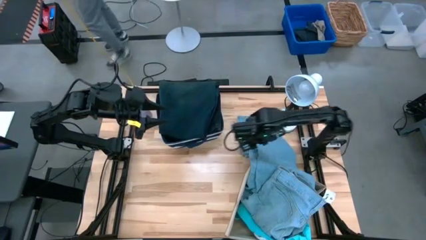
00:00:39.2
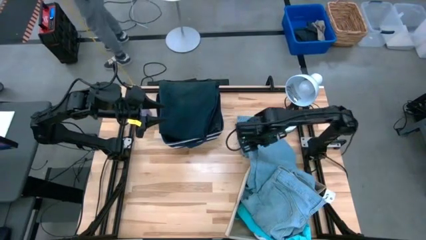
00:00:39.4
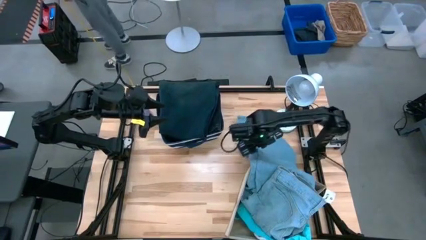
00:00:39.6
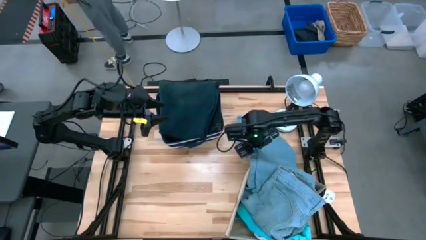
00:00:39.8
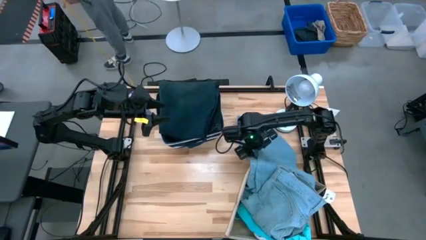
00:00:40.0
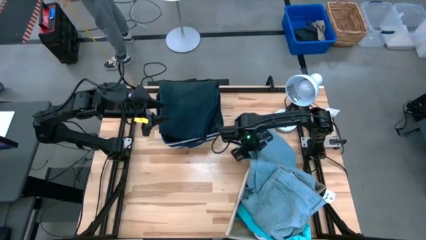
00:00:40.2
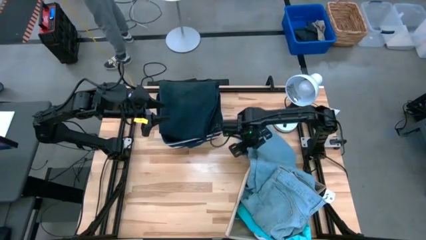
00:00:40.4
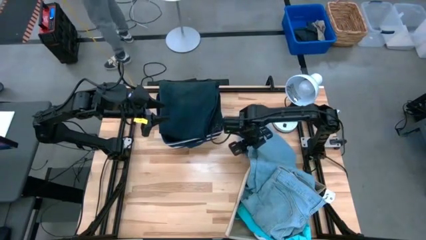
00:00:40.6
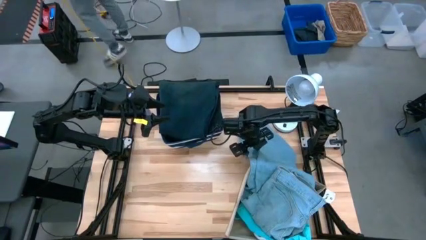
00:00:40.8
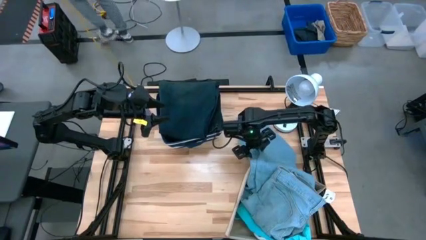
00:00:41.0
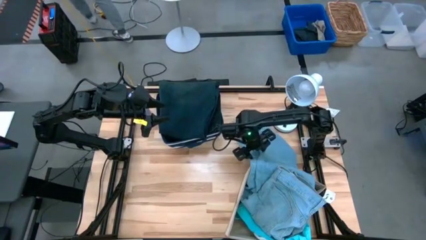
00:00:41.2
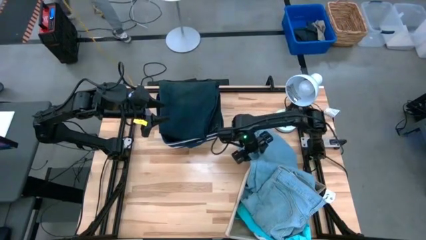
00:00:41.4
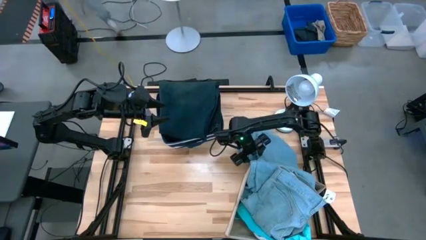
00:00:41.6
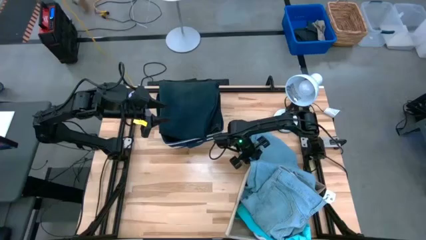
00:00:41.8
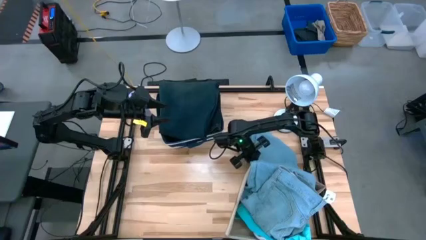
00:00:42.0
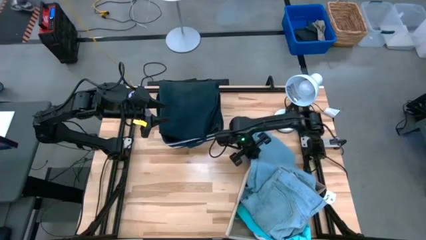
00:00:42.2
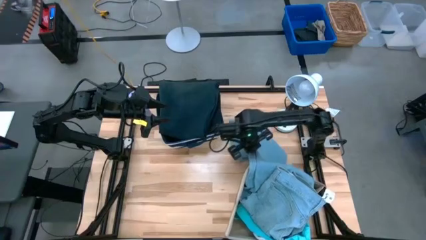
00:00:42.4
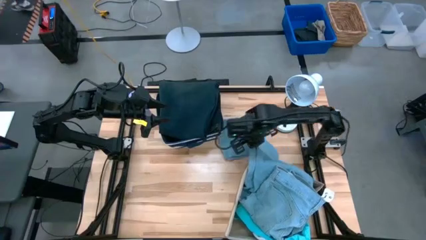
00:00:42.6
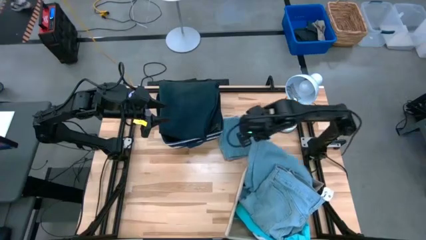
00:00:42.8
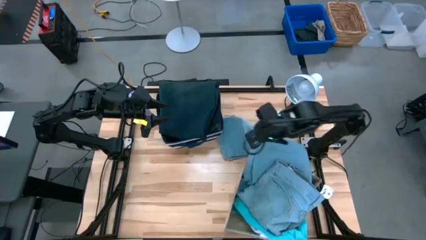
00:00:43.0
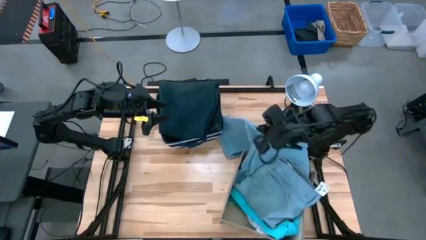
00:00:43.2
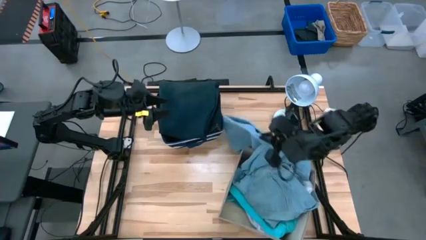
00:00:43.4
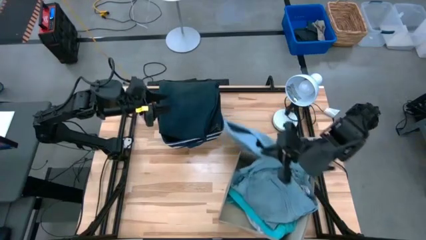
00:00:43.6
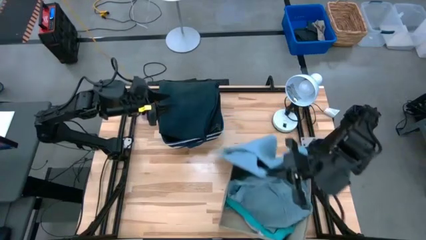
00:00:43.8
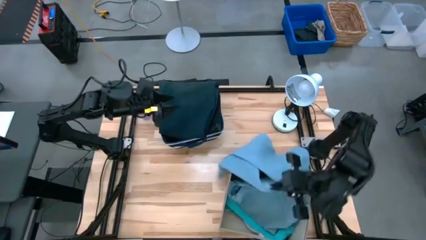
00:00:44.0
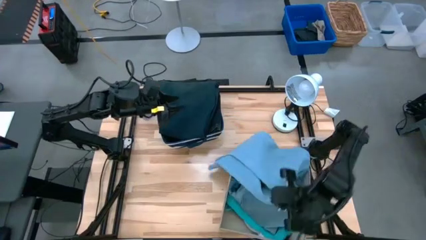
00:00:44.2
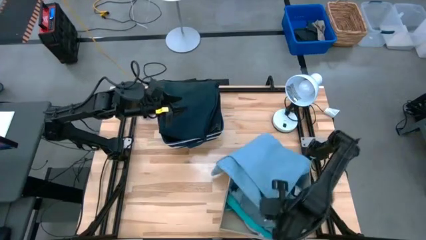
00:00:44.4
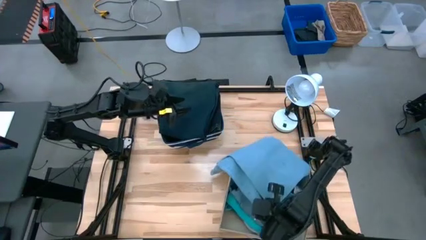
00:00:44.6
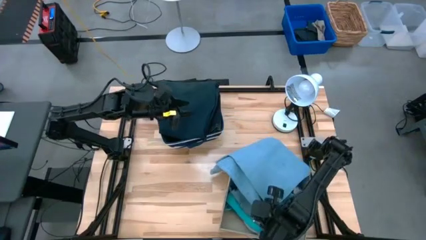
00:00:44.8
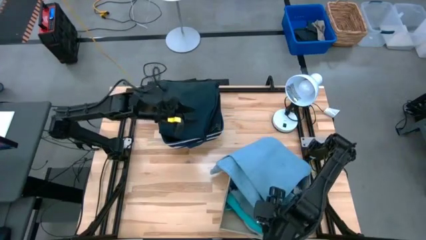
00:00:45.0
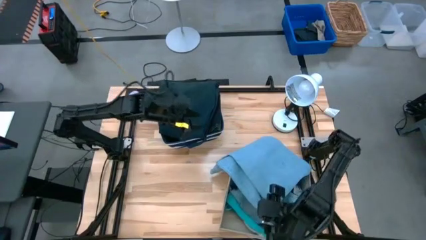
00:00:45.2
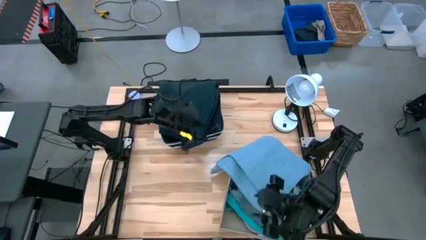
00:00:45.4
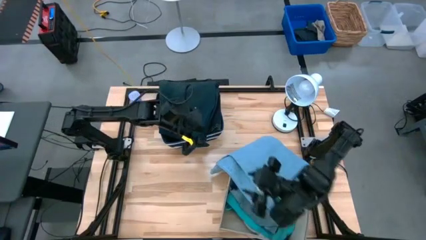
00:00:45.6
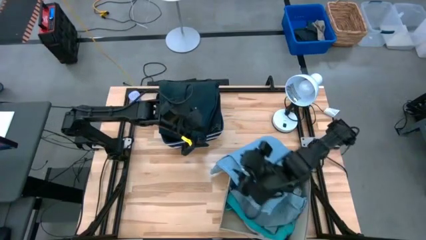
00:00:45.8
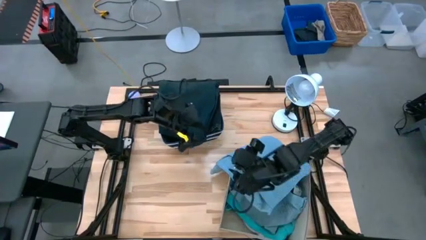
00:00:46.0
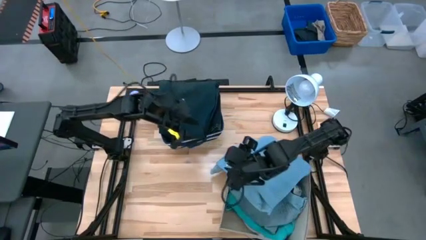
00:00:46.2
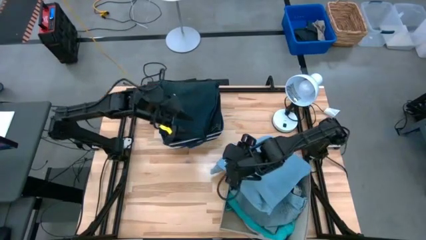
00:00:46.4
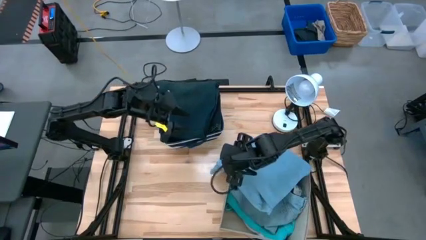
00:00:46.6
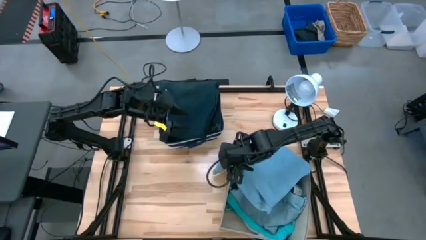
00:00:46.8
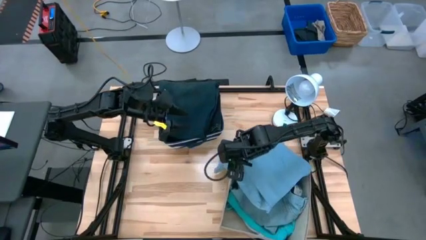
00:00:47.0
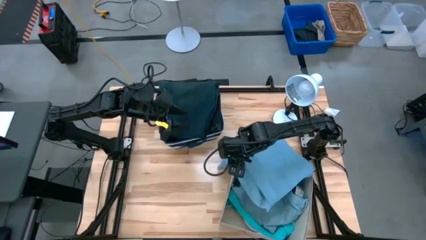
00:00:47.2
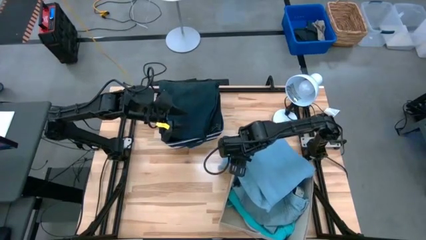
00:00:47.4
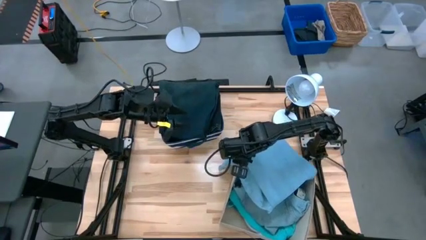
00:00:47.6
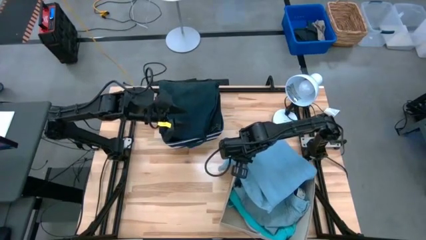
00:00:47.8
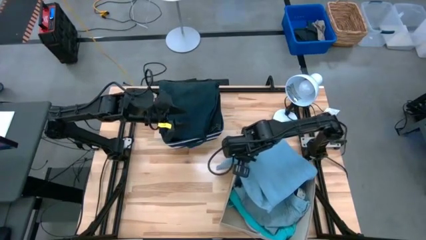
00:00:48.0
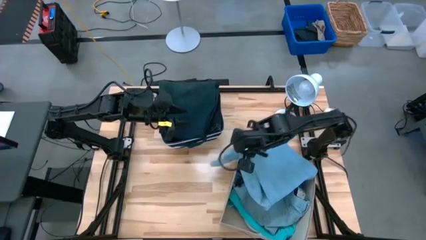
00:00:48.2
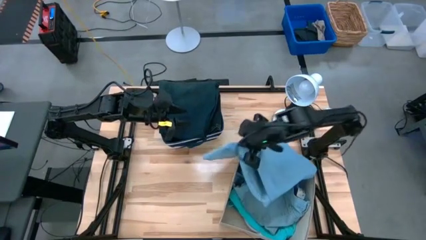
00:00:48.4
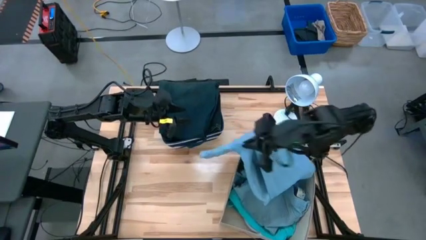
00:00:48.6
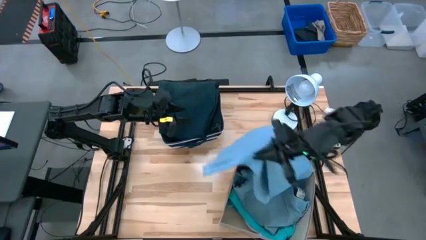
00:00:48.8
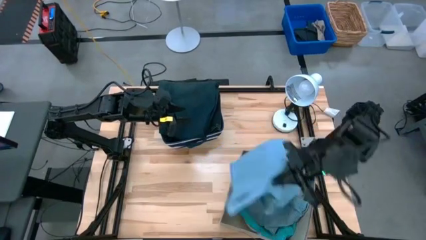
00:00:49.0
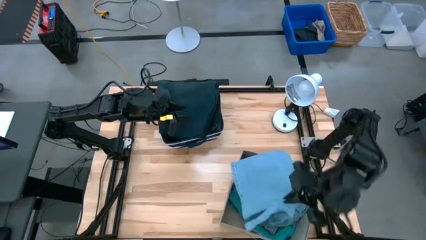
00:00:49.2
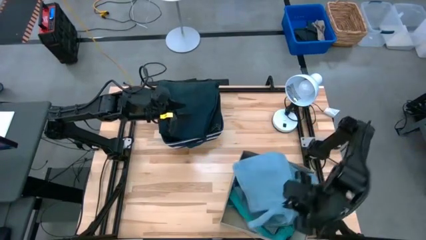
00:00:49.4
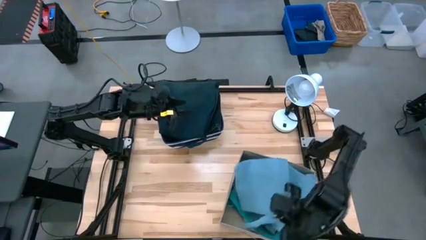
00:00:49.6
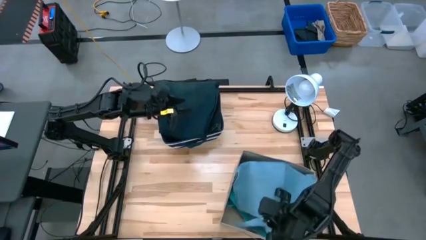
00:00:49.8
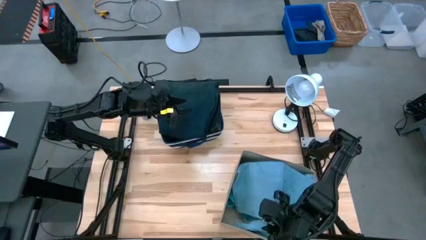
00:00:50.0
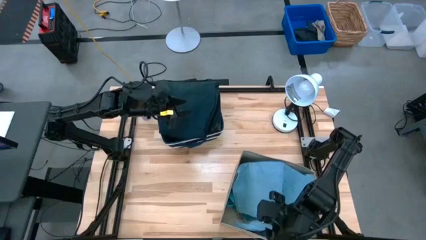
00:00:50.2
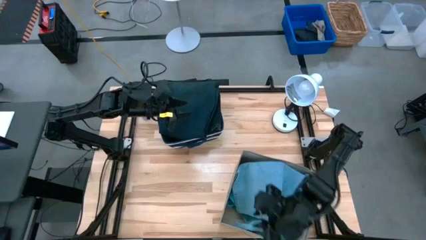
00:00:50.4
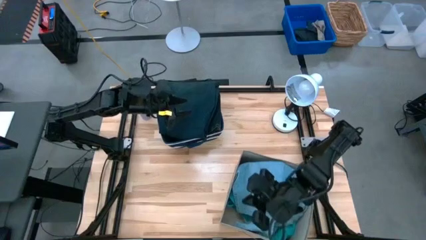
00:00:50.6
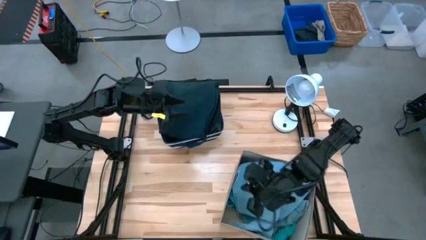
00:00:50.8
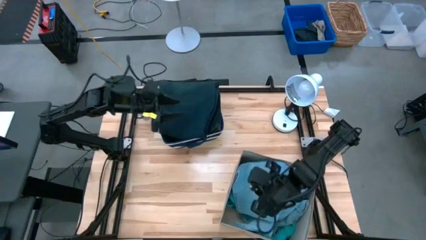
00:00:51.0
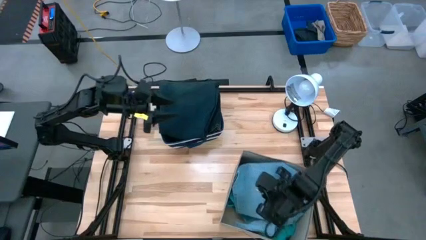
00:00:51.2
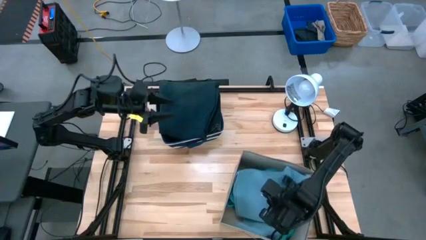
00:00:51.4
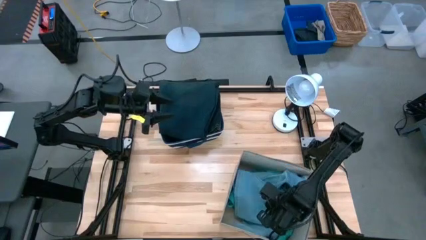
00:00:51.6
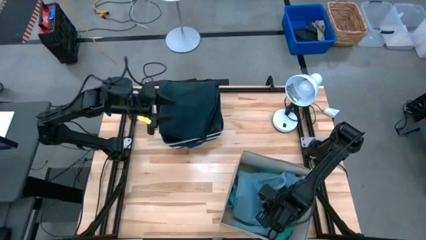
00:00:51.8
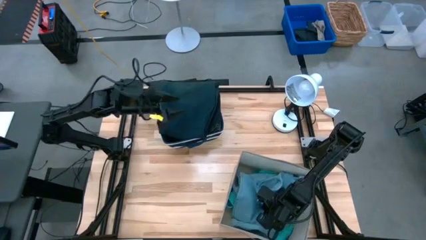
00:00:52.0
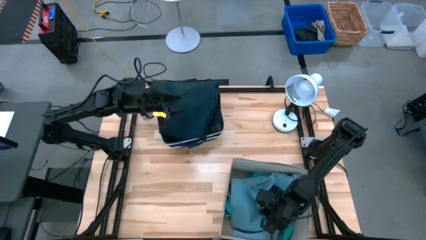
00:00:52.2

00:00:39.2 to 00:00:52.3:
Task: Sort clothes
Put the blue pants into the white laundry organizer
